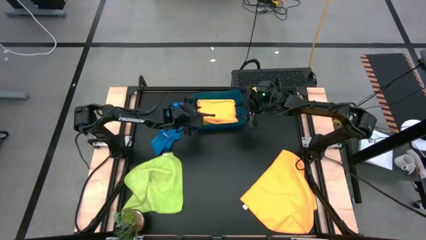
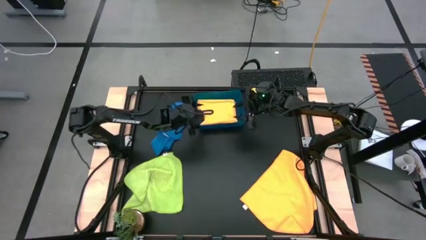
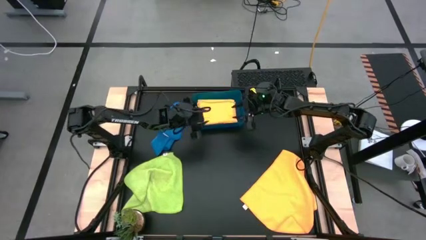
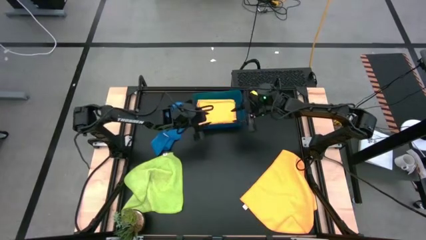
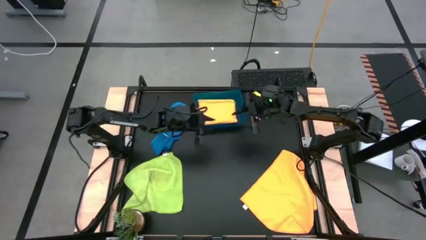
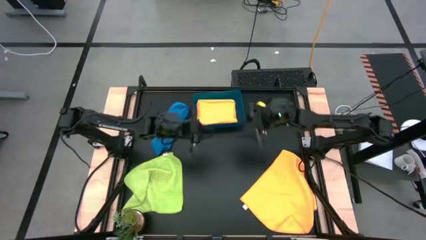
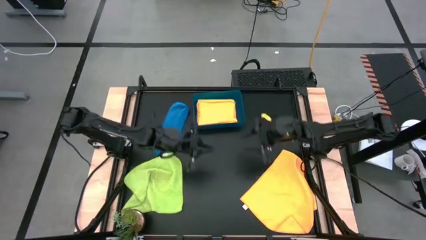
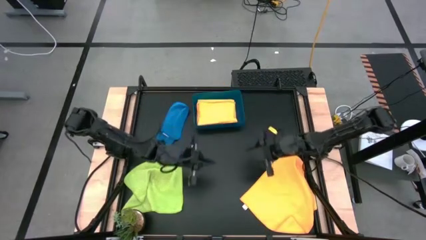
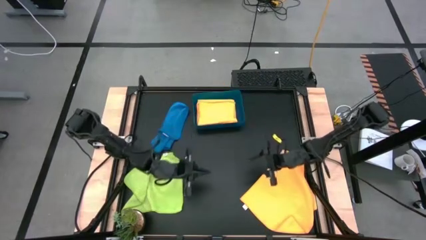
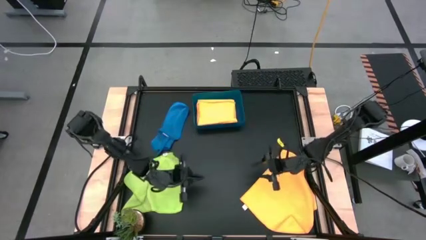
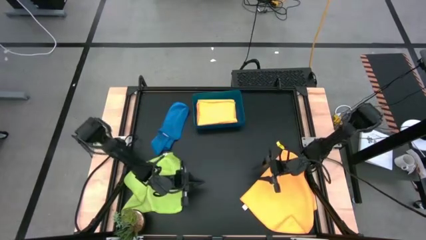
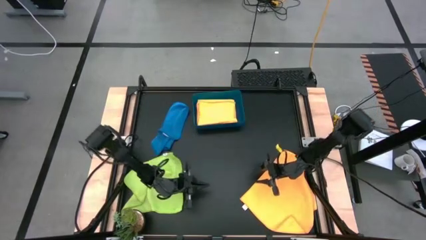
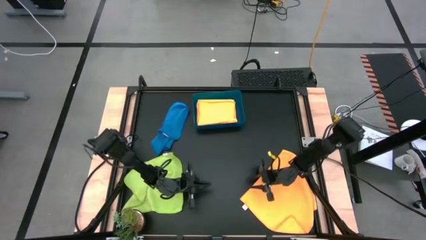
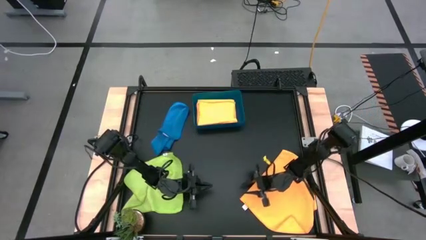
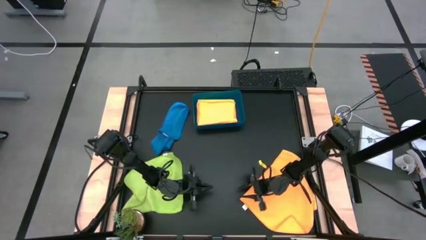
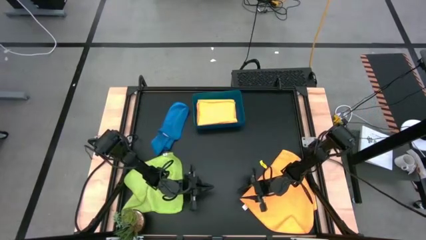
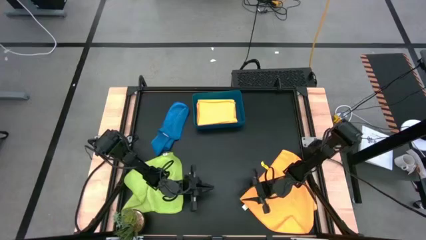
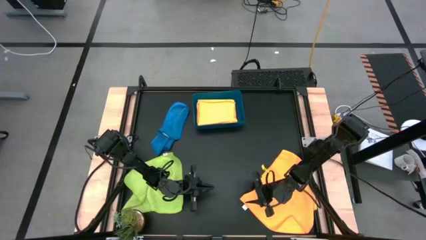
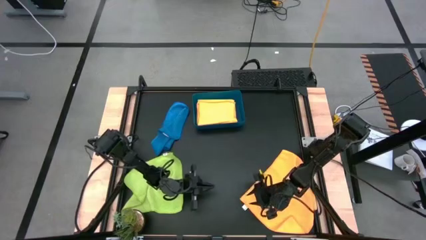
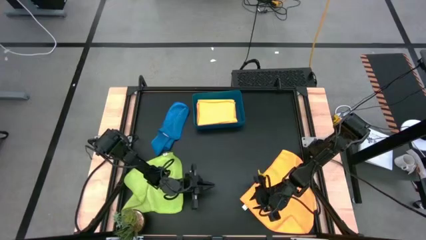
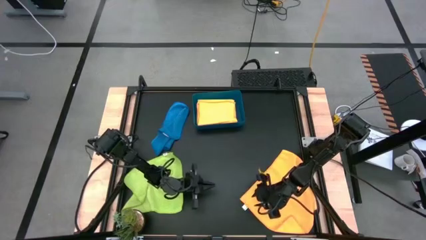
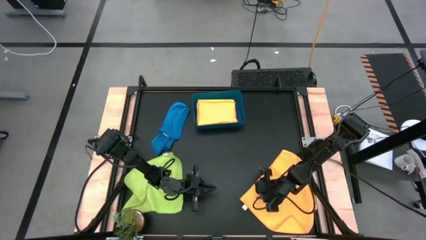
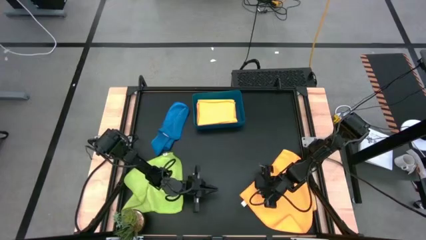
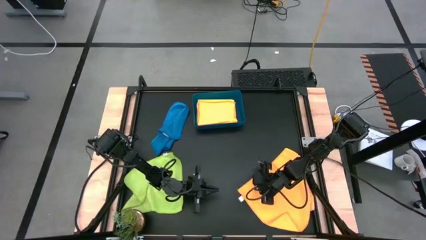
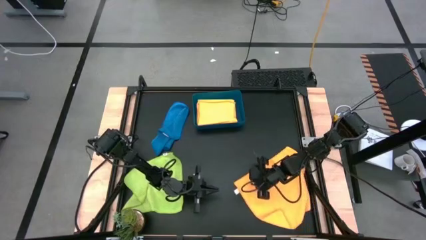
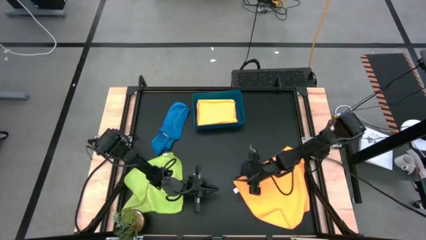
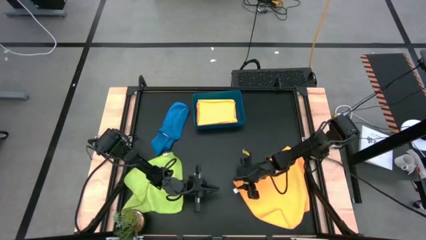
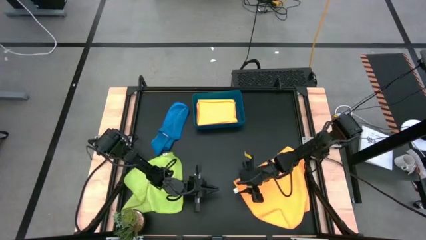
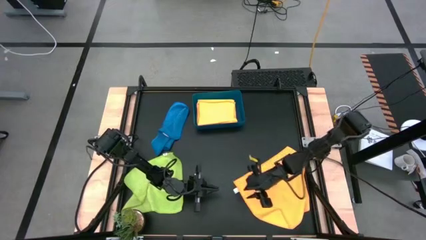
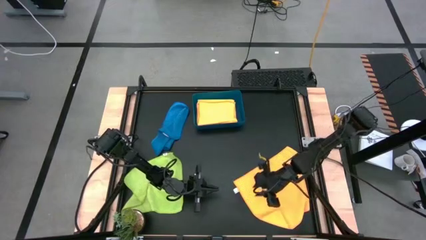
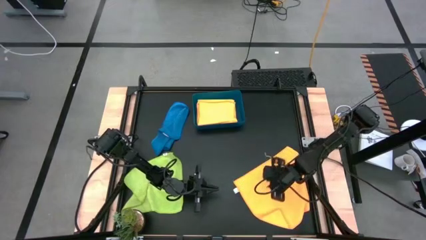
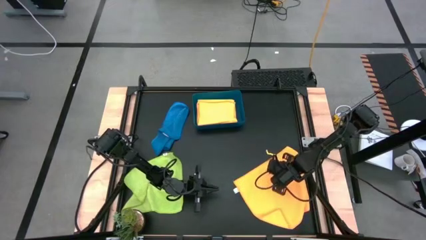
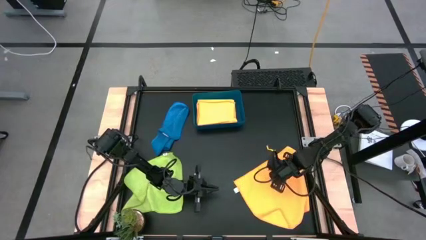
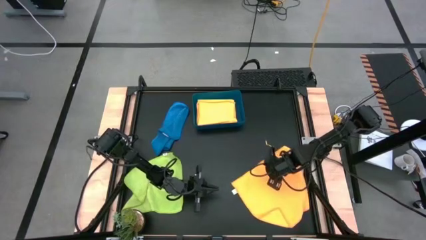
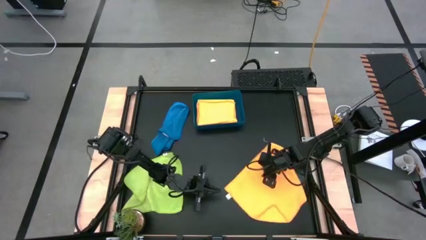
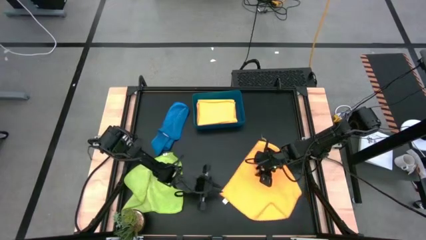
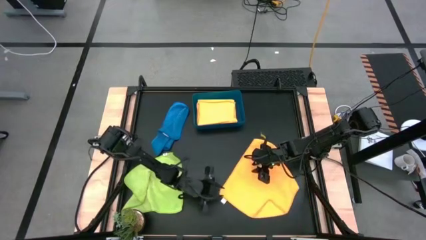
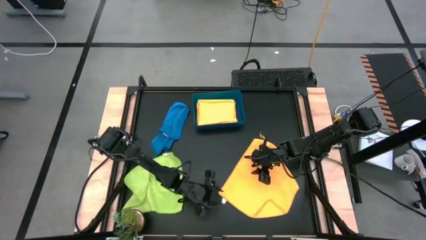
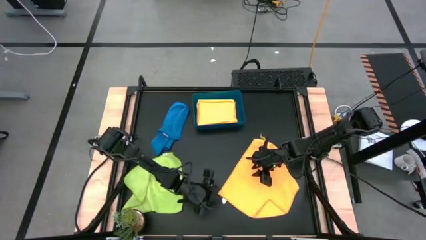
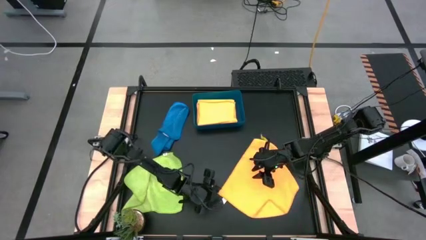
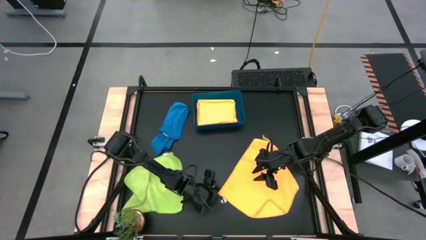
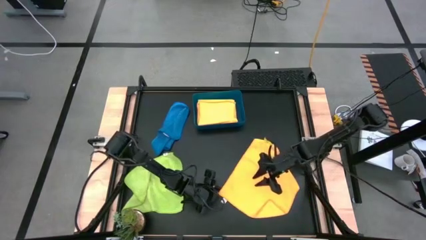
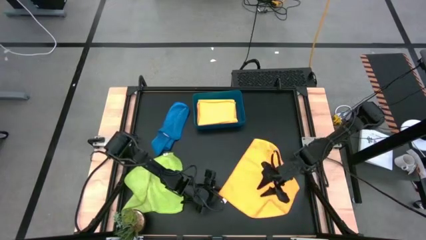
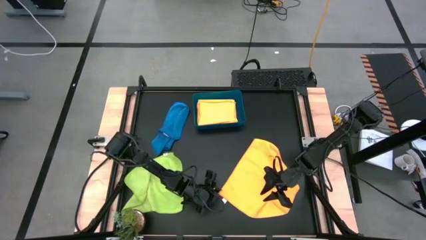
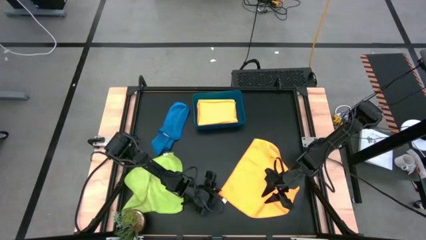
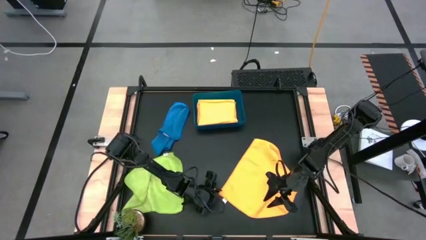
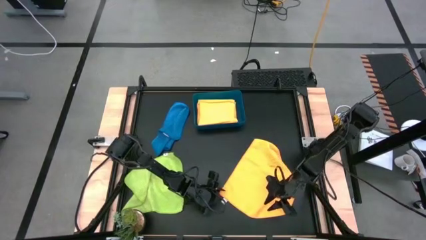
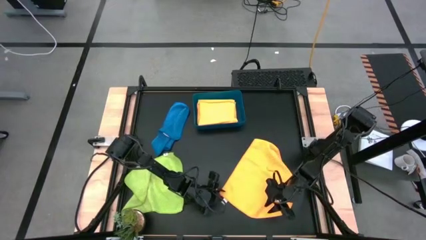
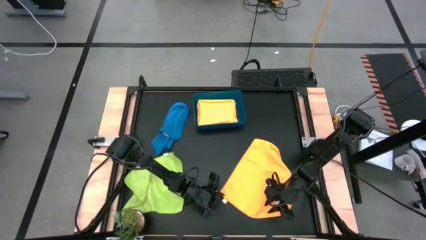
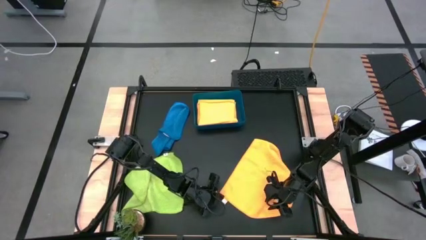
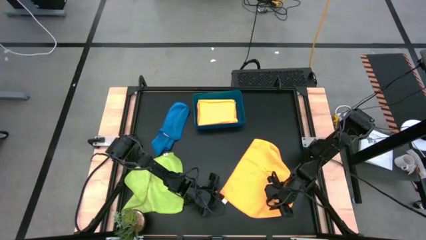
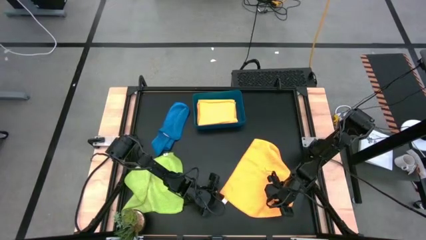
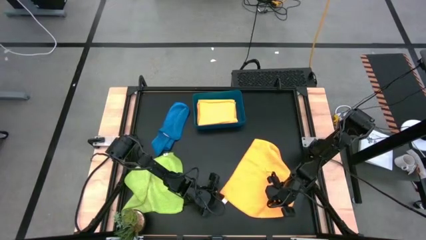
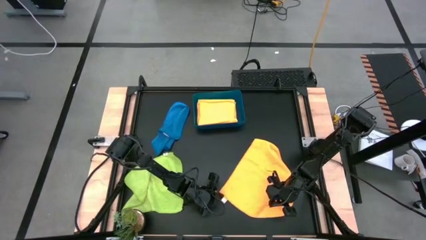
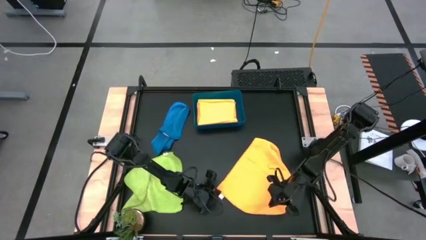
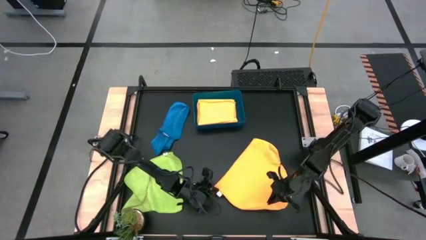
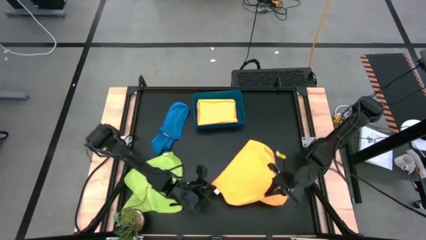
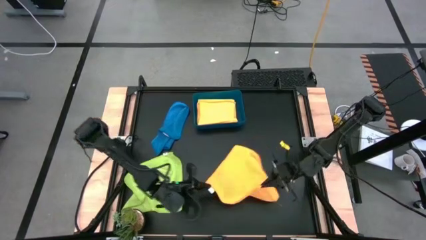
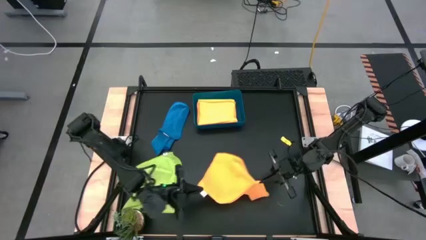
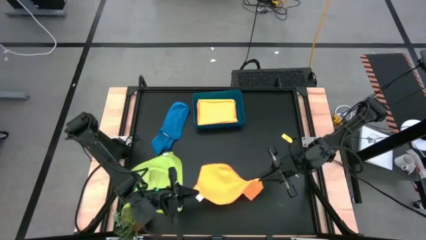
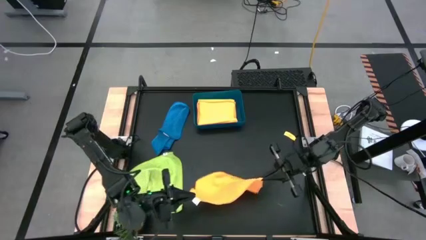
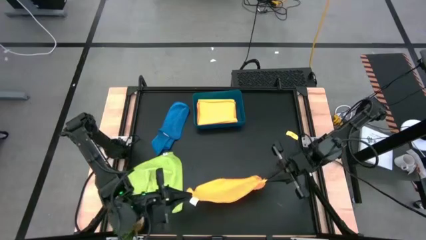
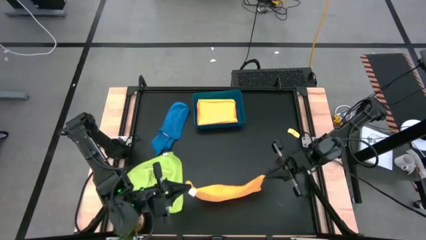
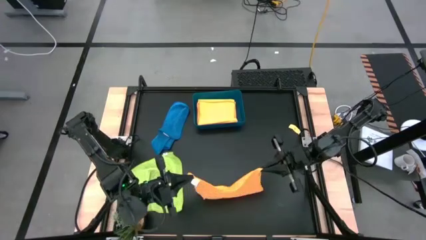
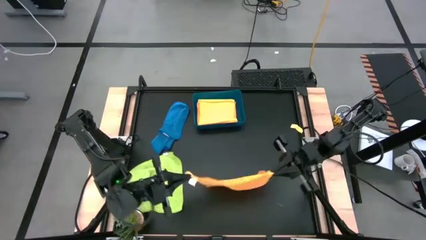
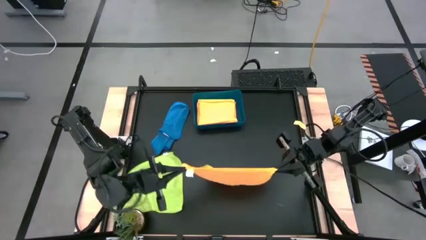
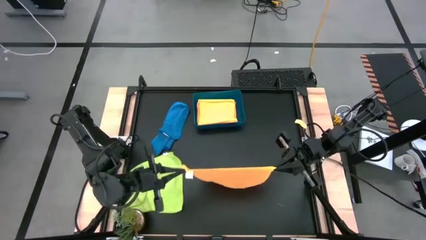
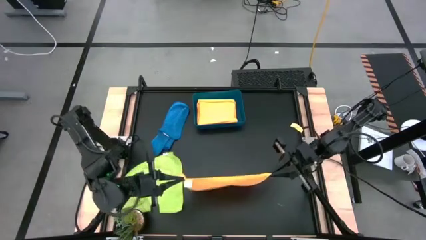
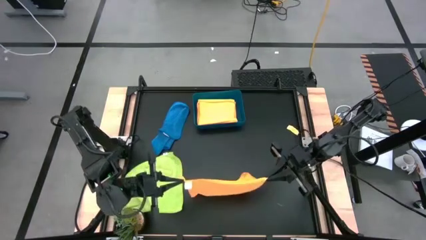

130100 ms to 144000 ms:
Task: Fold microfiber towels
Fold the orange microfiber cloth
